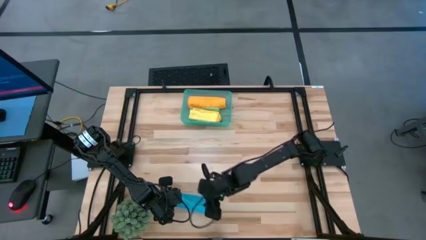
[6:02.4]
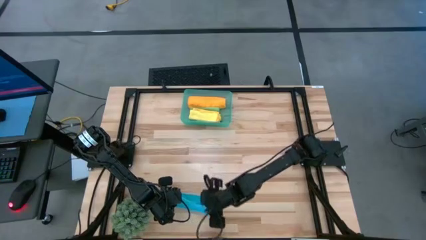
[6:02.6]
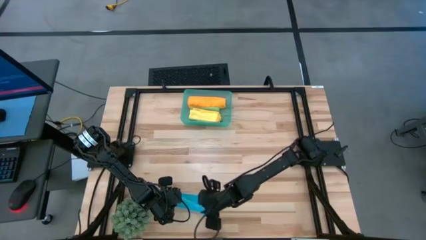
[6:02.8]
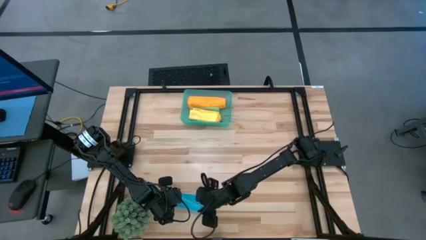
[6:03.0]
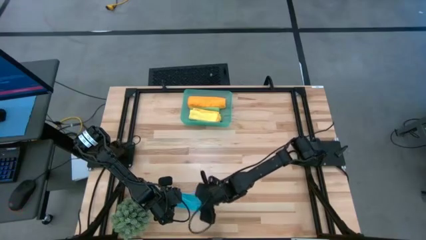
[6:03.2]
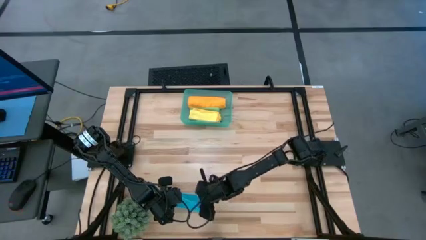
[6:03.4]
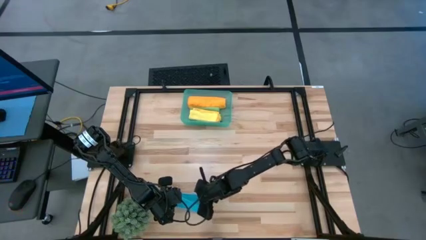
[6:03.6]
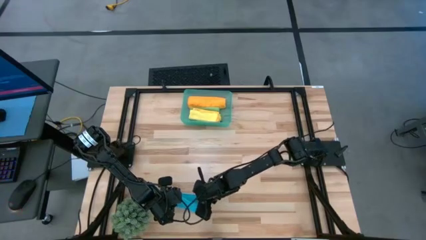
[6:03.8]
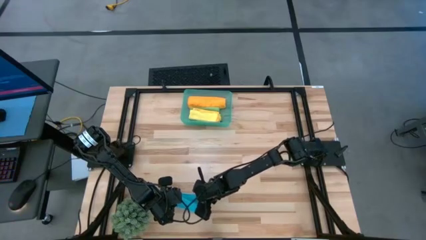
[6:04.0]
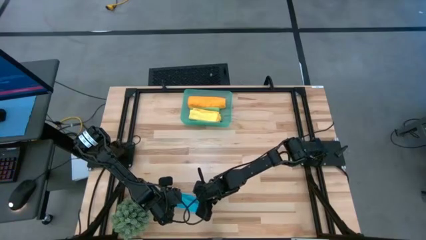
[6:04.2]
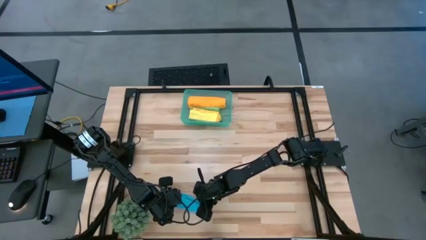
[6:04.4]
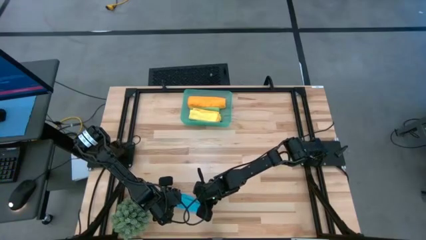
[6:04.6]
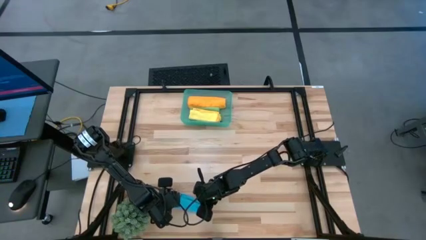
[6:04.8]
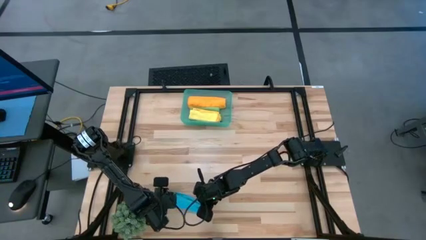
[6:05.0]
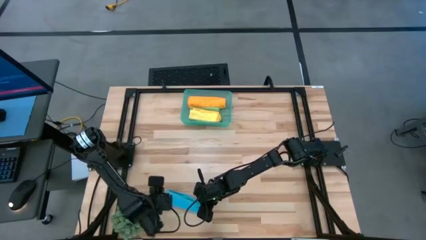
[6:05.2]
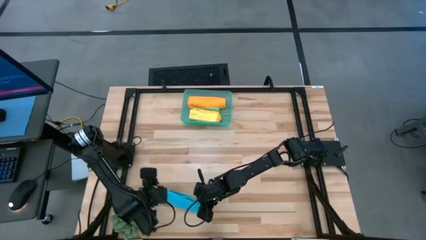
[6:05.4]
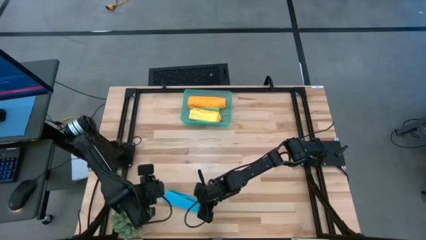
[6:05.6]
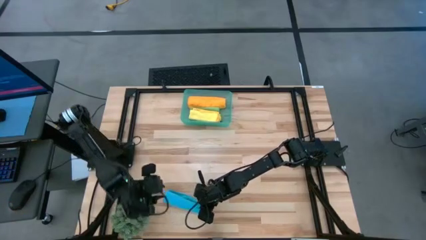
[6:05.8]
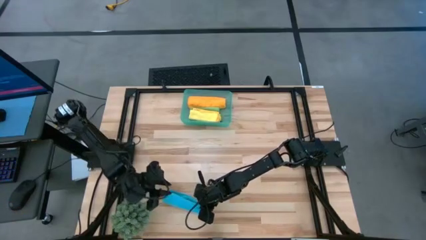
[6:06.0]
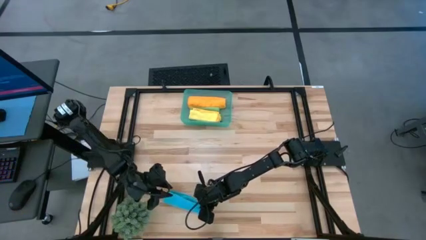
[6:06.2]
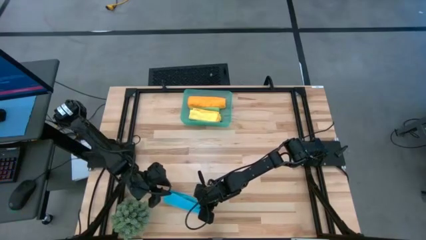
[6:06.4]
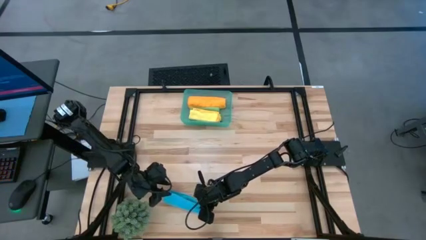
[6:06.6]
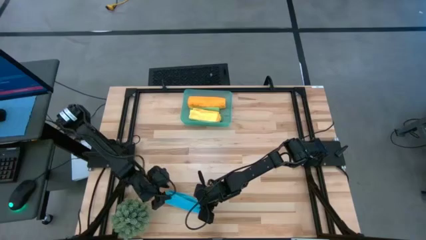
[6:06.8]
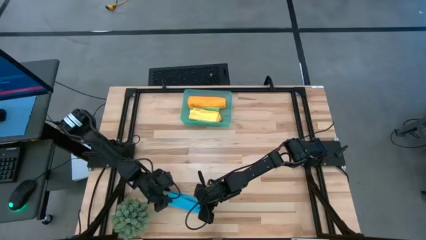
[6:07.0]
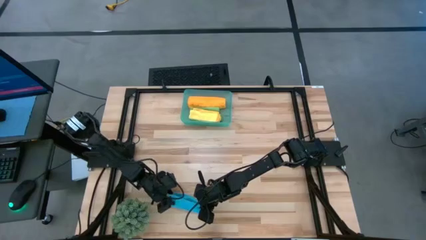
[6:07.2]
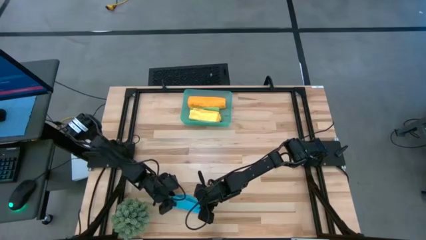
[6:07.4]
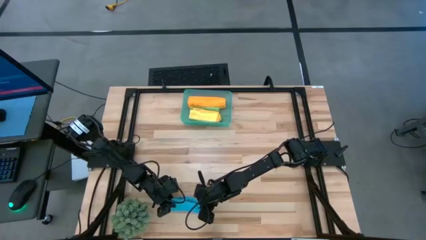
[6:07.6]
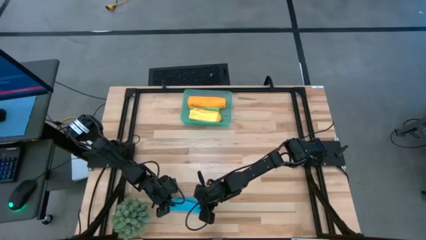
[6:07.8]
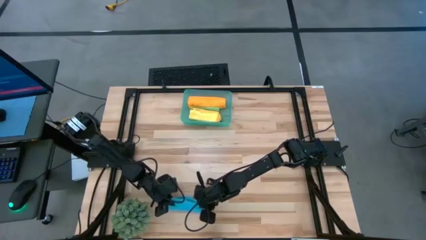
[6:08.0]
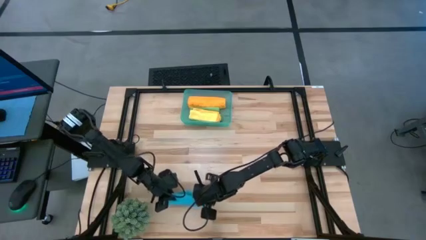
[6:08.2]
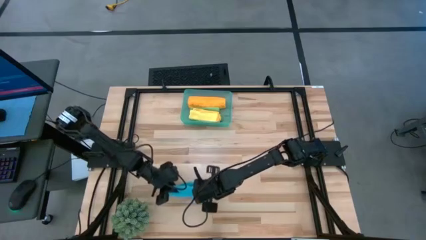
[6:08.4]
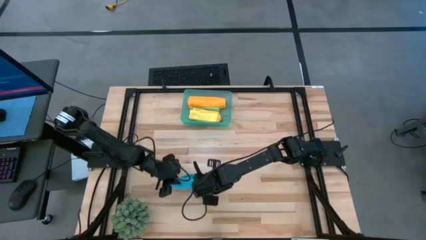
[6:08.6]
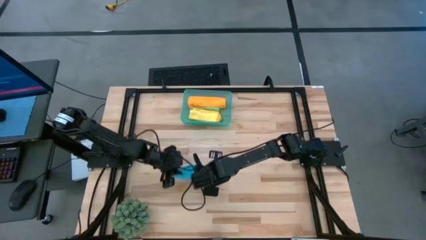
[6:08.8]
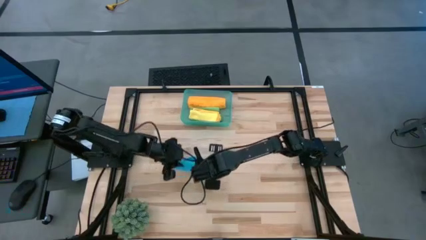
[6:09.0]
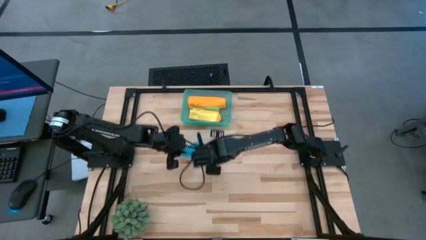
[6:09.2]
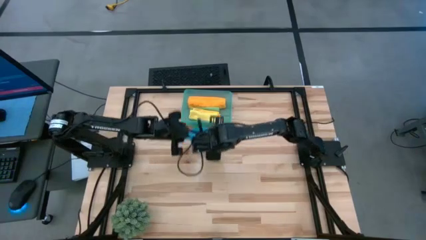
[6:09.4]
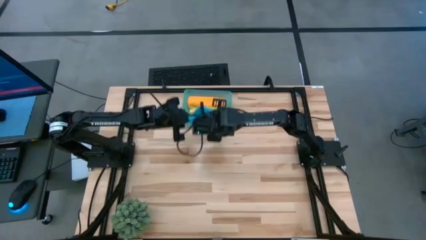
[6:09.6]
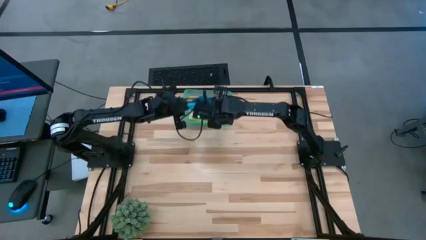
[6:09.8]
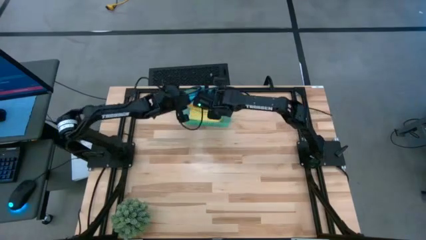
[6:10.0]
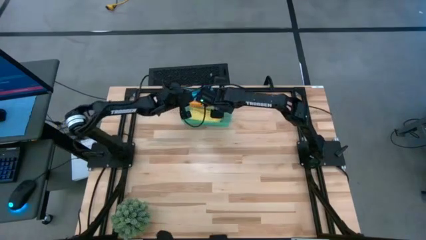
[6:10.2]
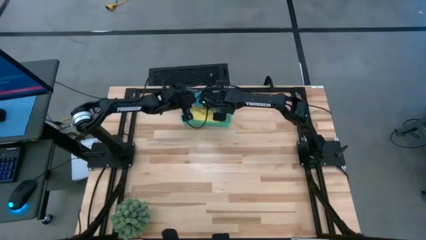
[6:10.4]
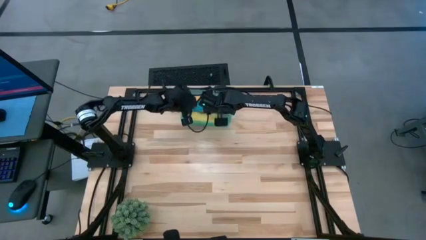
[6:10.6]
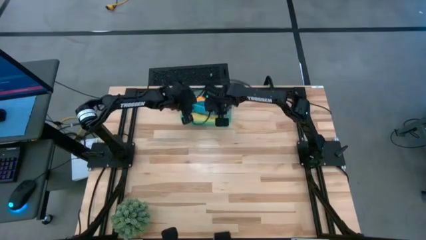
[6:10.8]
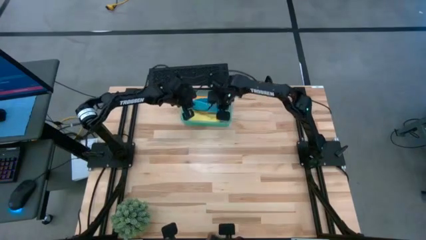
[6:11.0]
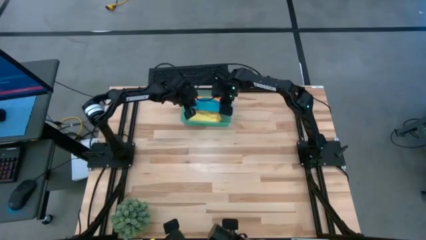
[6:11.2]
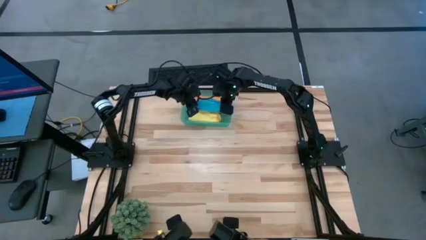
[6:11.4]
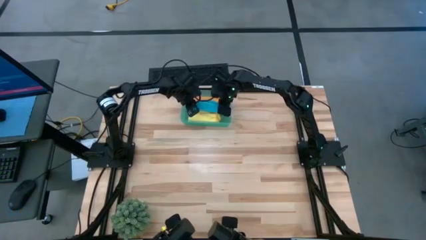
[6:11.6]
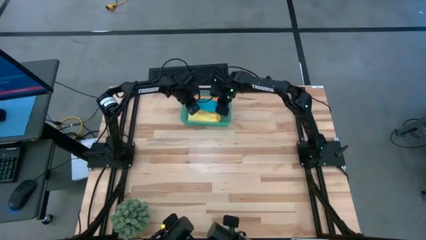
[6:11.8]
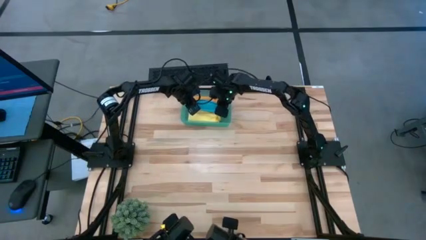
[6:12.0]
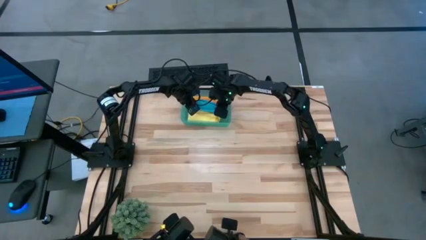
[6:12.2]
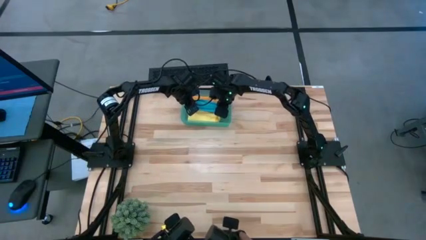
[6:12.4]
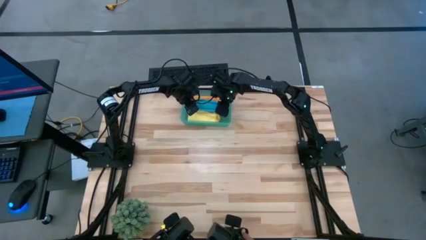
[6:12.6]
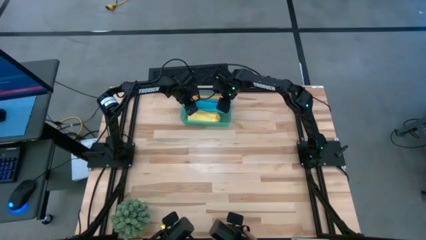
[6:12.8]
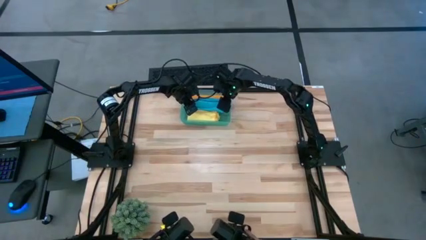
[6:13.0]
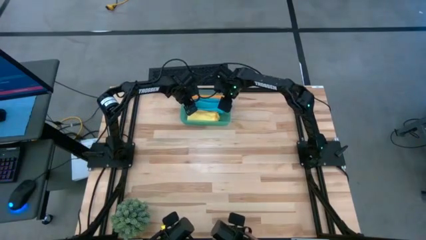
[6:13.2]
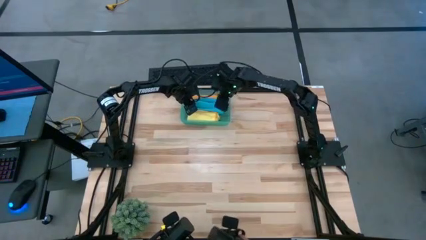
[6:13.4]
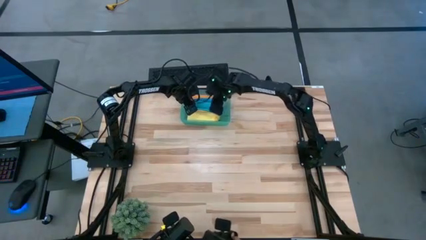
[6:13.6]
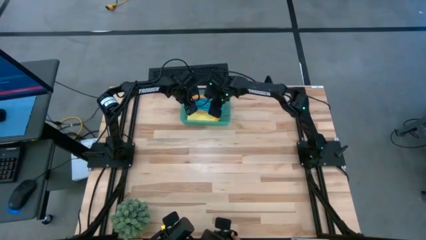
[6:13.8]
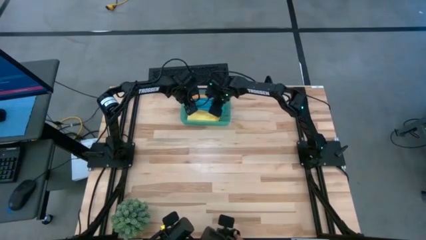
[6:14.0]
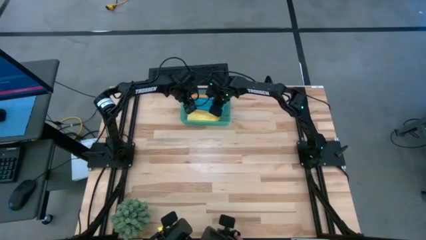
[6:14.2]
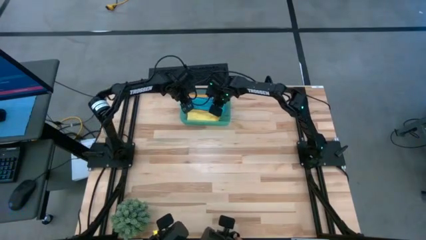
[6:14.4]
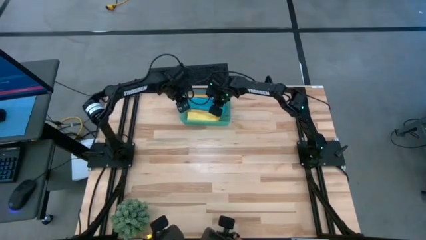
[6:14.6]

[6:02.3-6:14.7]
Task: Roll microfiber towels into tight, uniform cylinder then place into a basket
Put the blue towel into the bin
